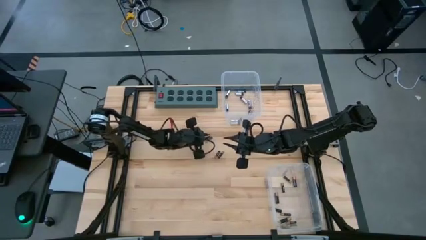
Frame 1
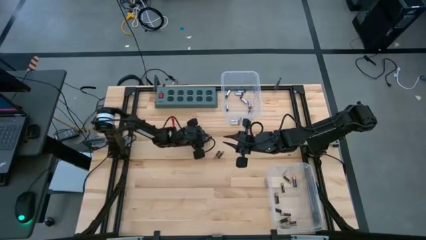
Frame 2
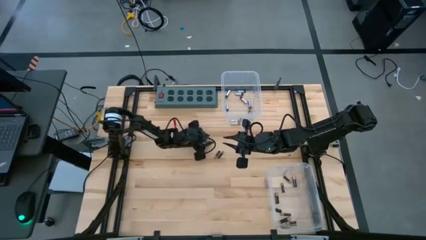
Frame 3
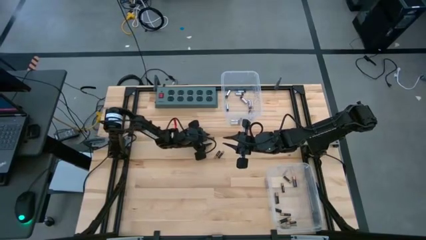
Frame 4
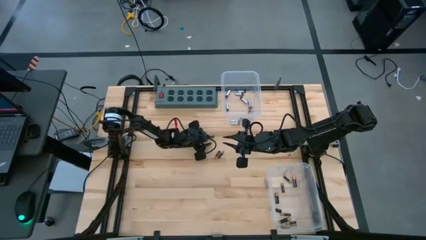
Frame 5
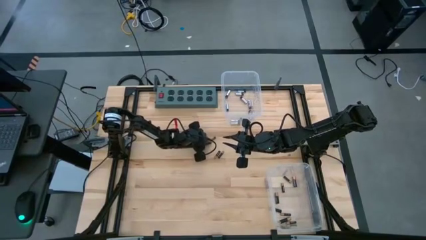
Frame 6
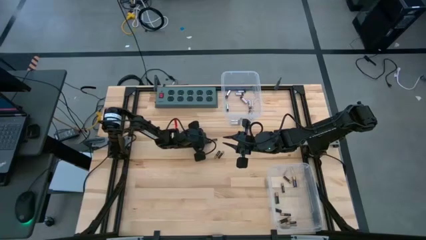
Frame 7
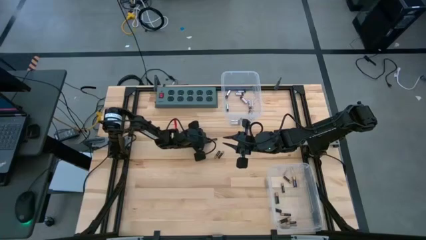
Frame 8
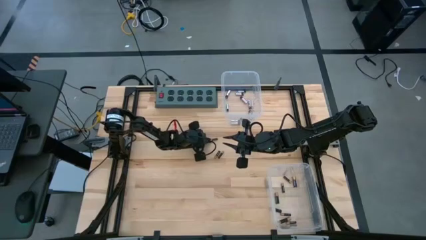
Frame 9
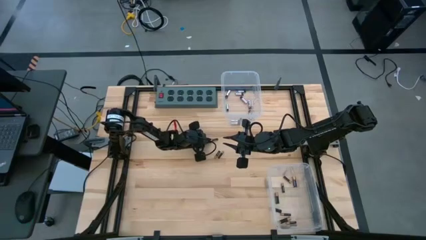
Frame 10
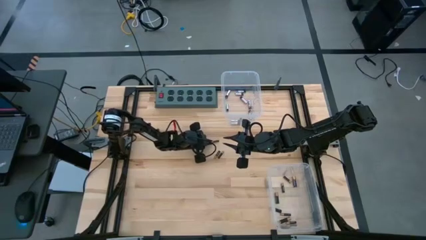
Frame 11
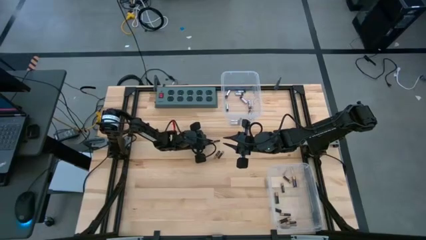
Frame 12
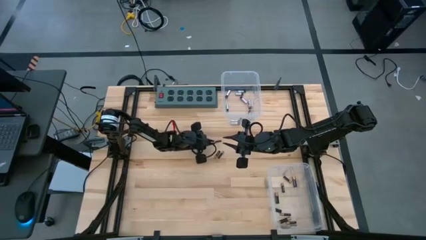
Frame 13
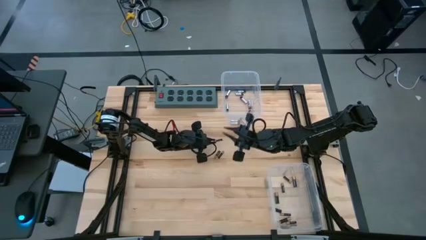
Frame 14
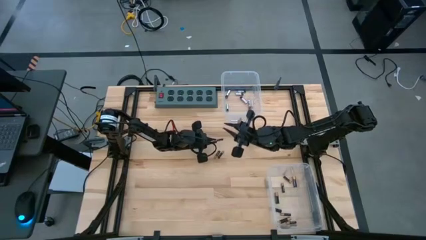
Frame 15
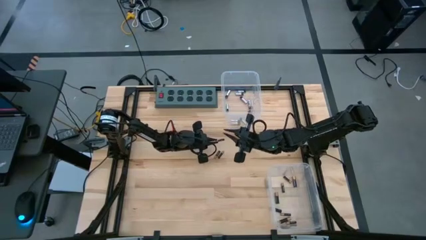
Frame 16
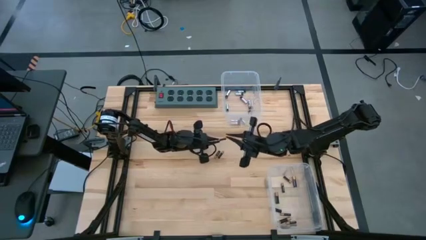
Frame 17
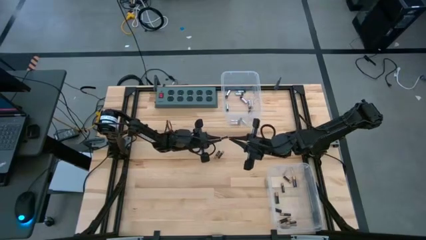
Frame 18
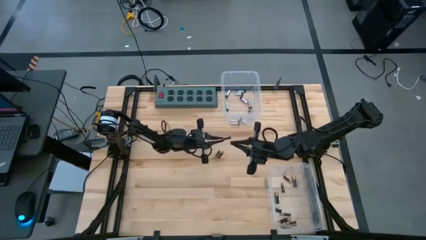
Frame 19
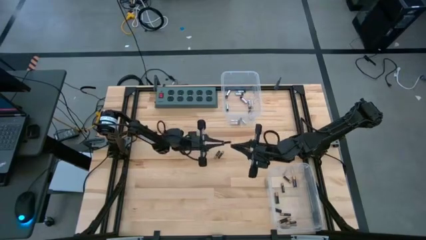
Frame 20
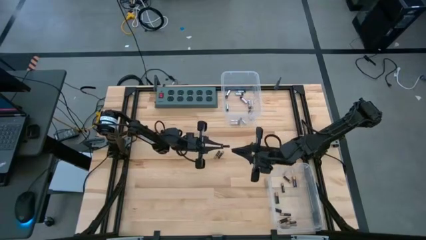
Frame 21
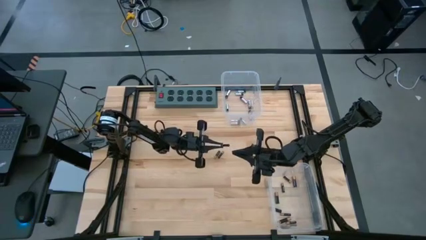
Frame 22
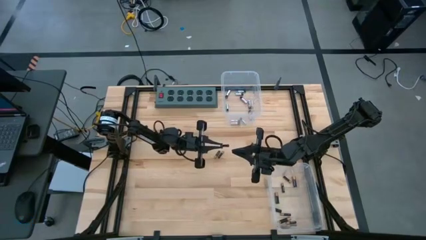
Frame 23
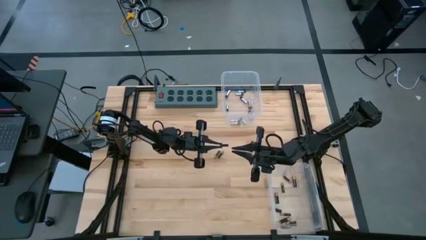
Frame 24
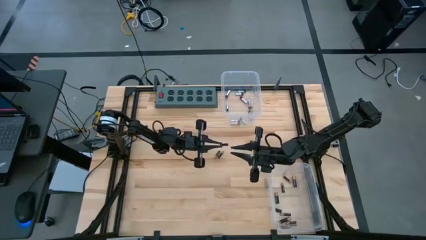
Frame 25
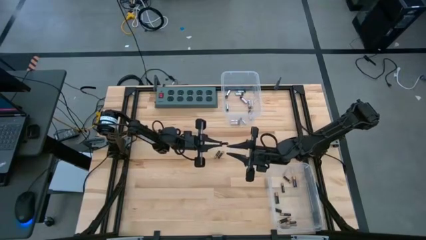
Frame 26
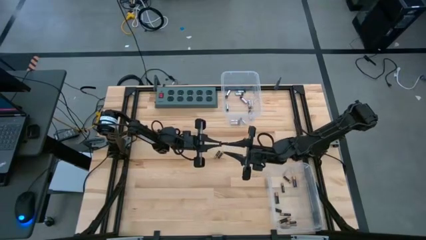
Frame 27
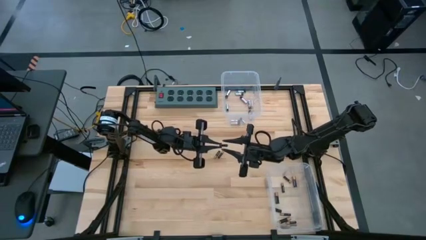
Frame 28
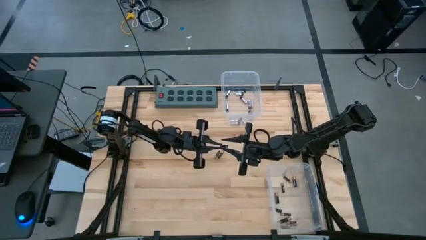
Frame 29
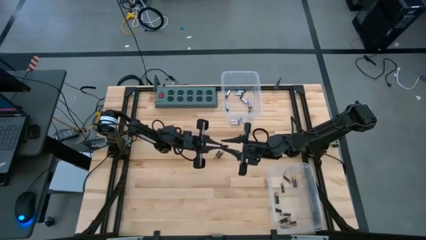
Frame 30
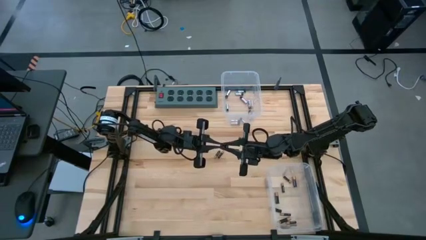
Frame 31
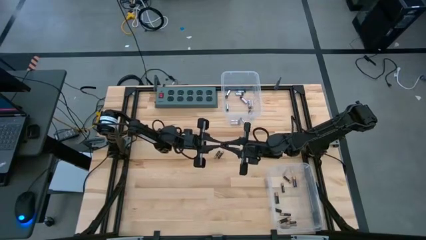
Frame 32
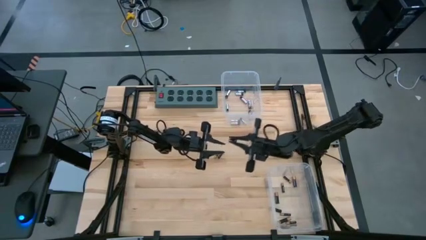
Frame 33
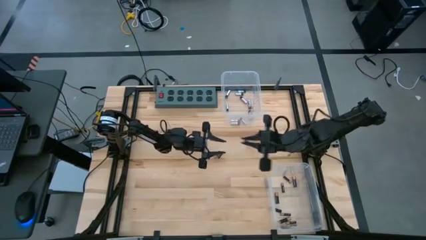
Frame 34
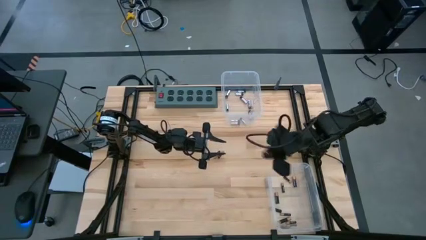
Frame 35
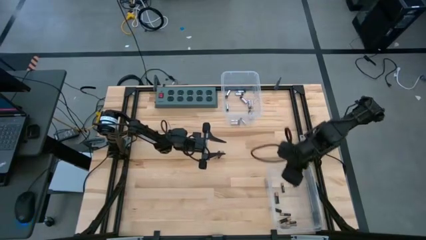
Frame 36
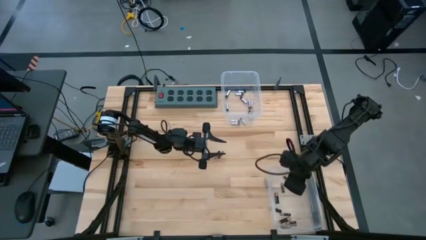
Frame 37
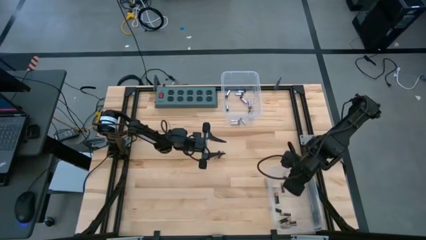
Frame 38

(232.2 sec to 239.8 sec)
Task: Sort batteries
Put the black battery into the bottom transparent bin

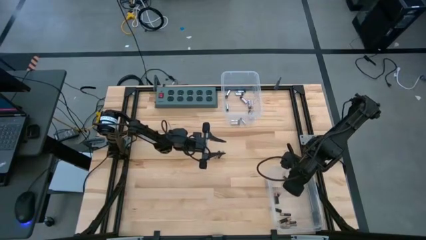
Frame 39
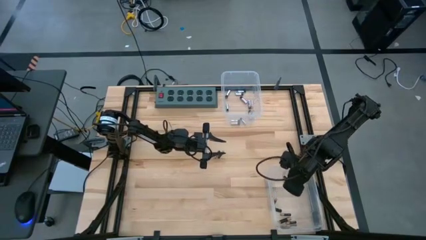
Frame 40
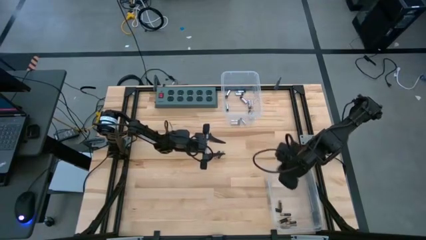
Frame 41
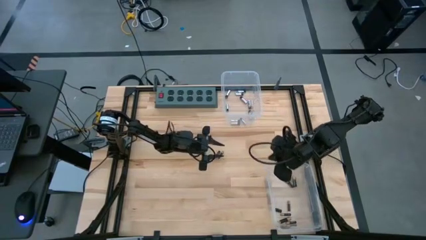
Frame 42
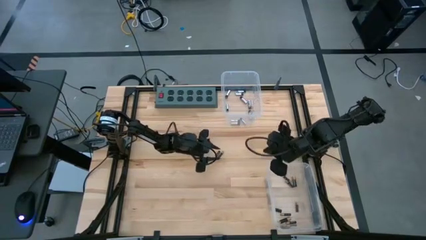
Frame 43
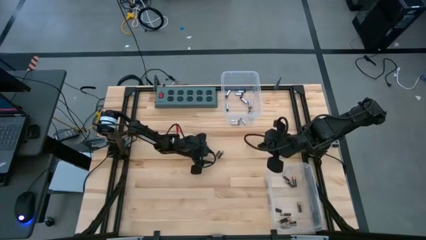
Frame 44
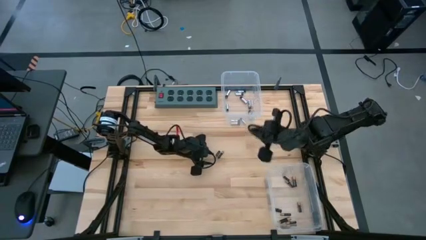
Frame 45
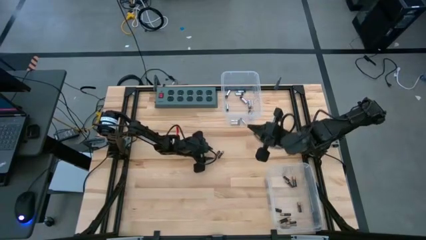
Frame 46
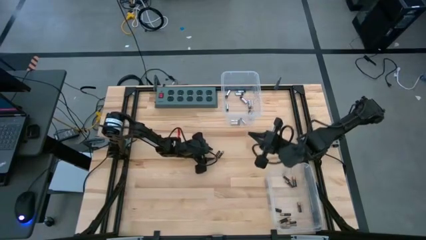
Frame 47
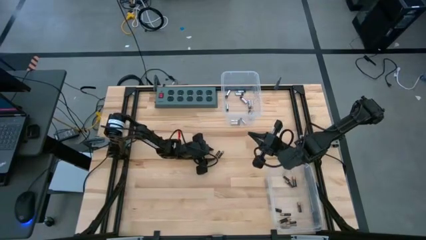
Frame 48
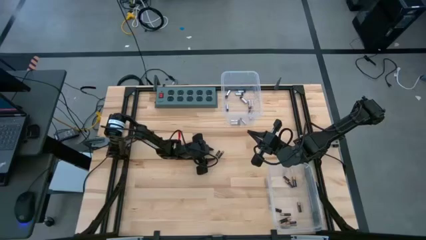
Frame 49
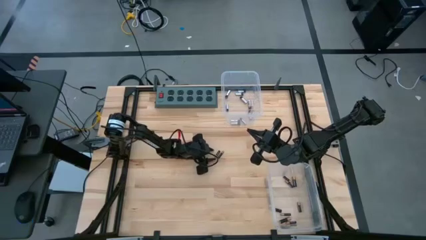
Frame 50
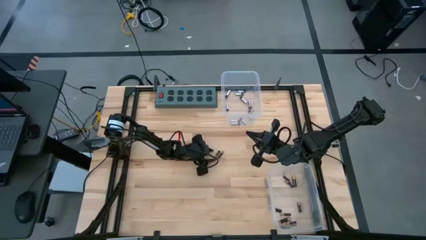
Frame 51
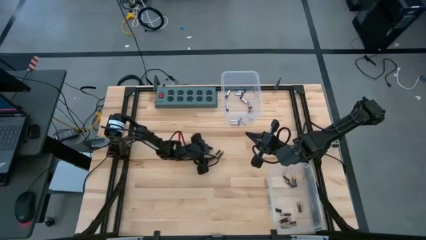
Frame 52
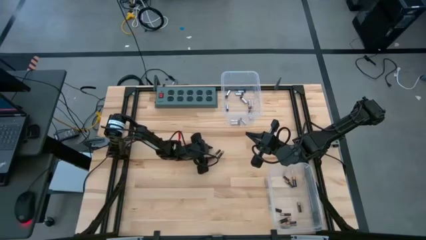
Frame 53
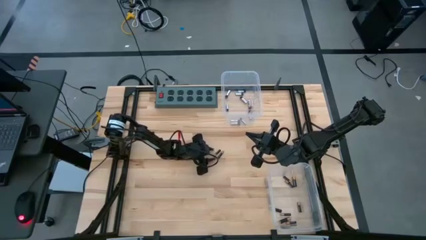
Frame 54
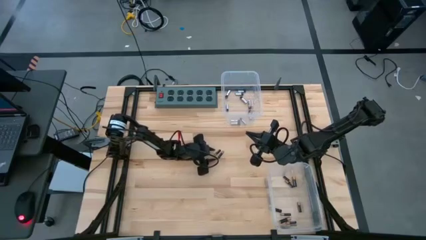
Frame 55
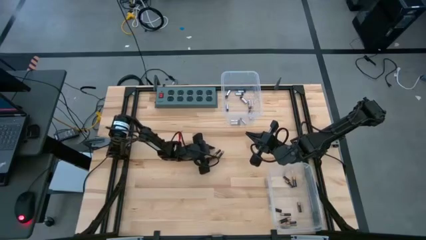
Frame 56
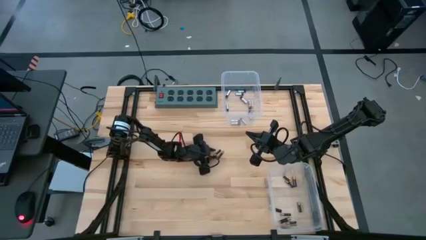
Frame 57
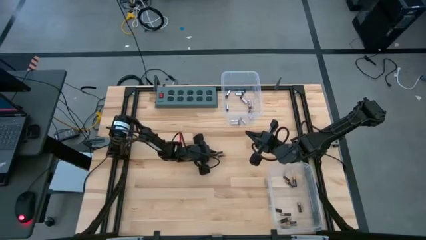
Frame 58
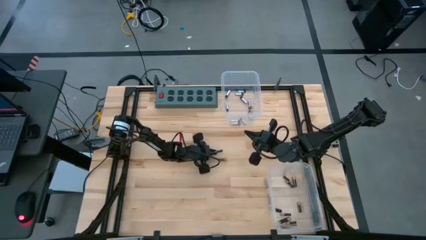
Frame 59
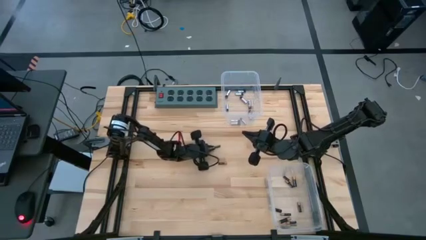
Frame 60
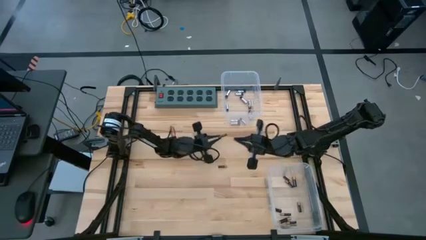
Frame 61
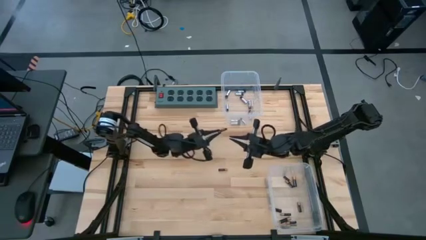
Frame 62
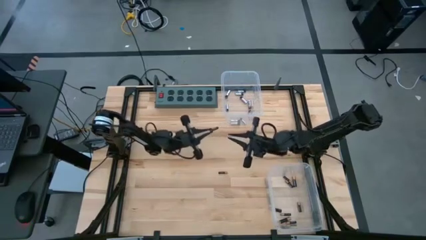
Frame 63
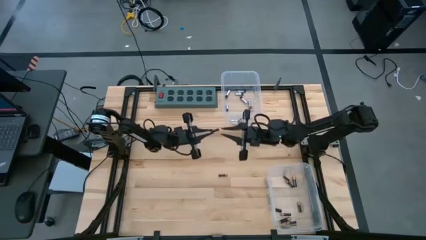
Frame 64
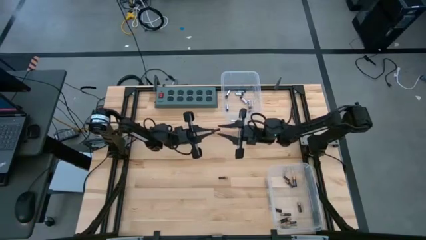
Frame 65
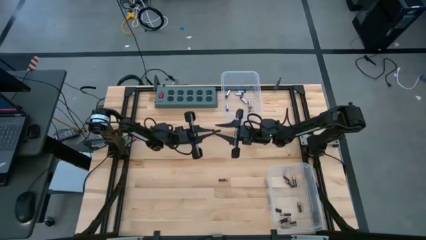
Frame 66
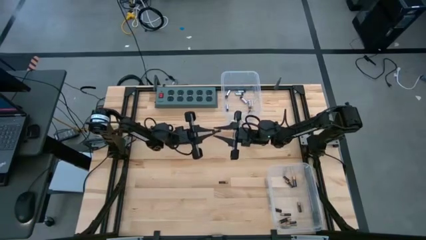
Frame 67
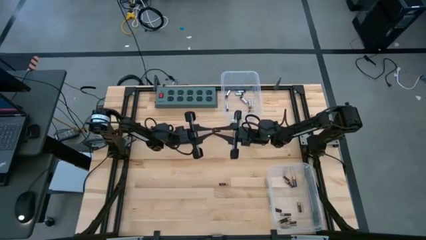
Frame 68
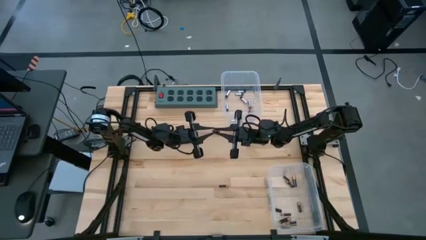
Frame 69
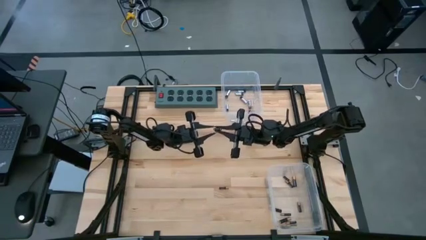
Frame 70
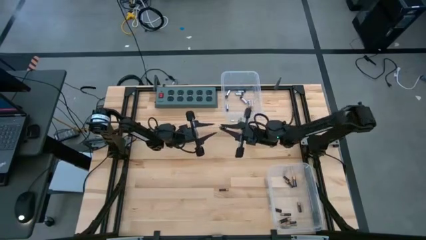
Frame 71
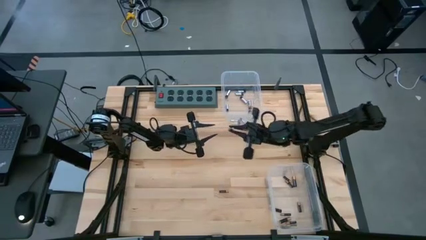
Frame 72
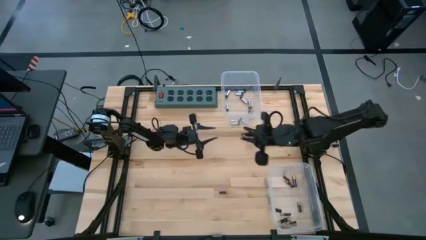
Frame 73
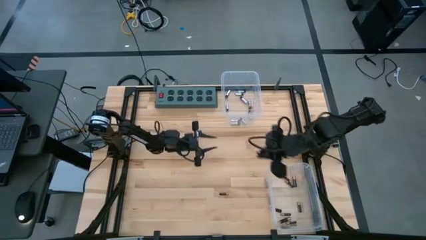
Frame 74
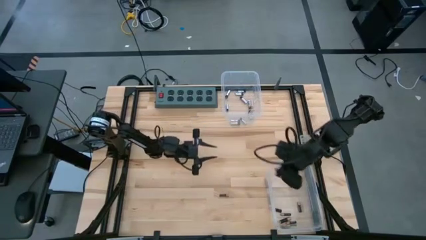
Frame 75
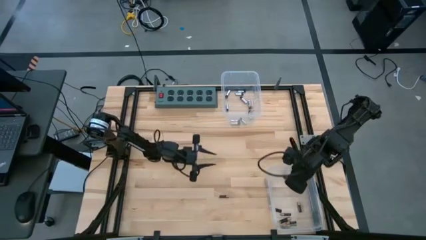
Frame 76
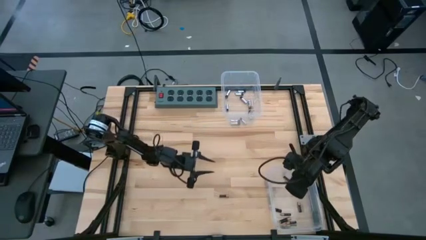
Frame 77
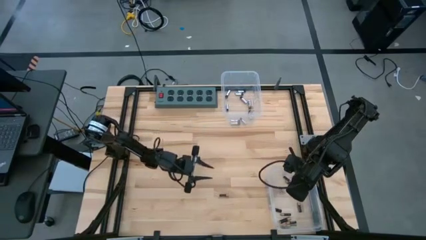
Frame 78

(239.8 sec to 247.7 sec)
Put the black battery into the bottom transparent bin

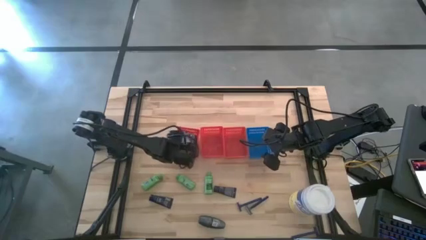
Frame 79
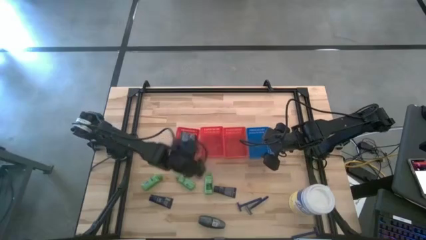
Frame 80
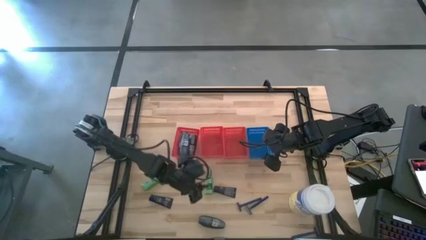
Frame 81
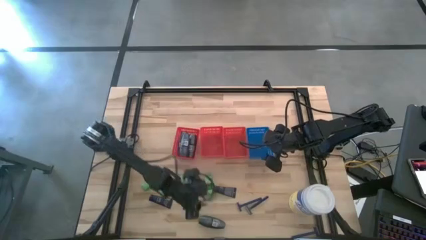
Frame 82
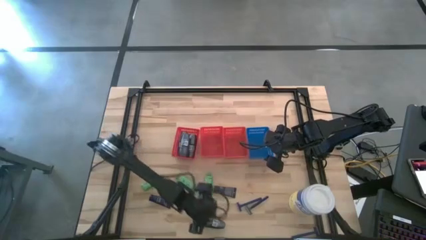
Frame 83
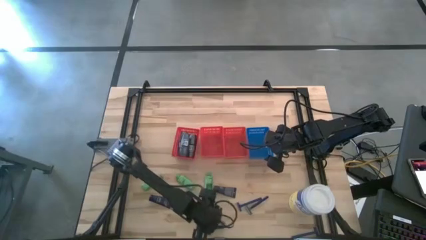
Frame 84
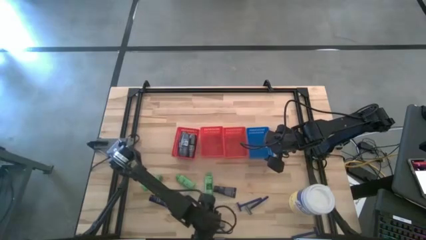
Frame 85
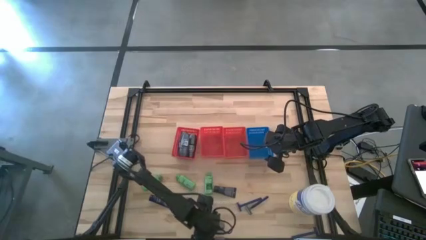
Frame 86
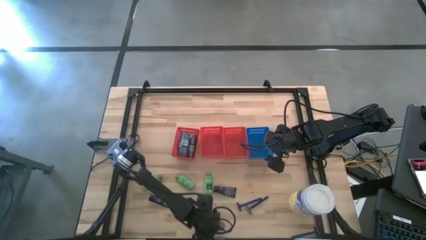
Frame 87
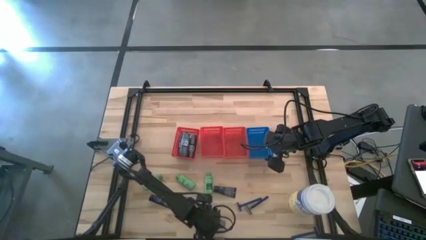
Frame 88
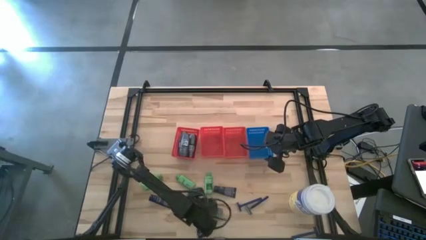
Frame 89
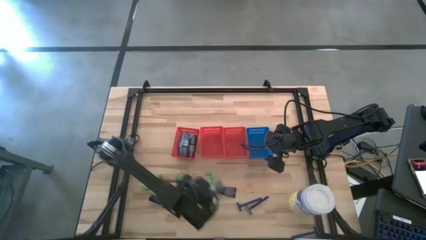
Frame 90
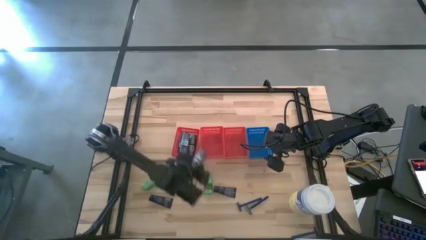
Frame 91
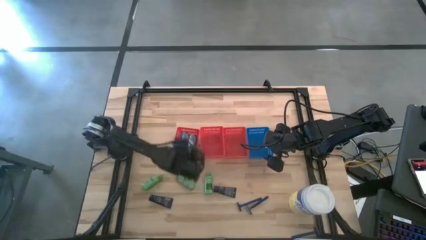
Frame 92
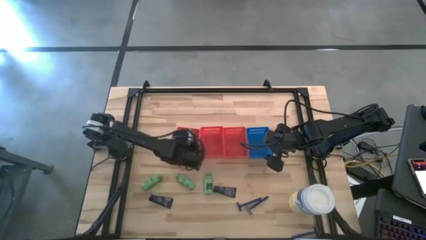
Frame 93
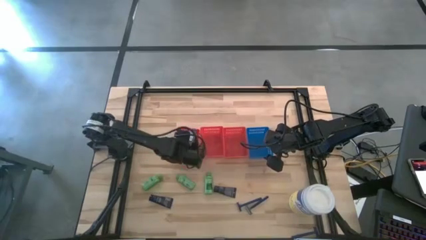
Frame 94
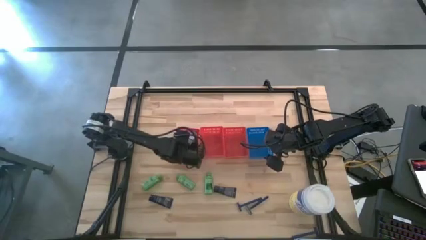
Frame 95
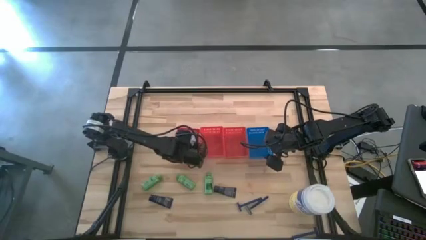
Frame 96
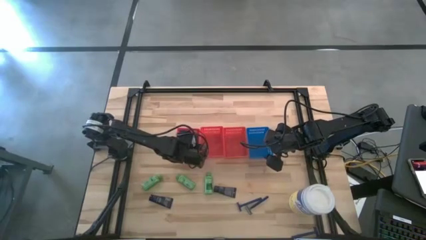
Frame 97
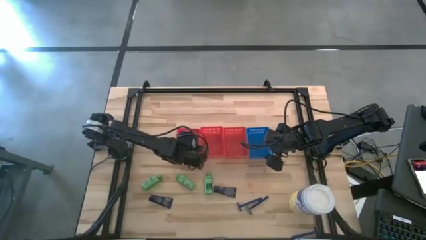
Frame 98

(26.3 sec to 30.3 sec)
Task: Pick & Place Travel size toiletries
Put the black deodorant into the left red bin
